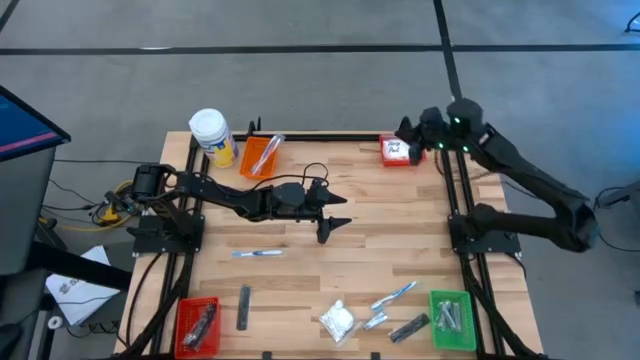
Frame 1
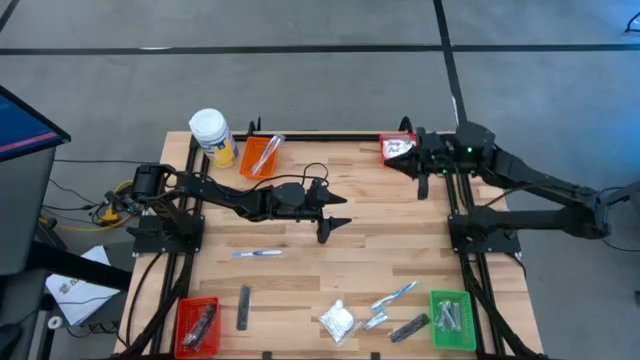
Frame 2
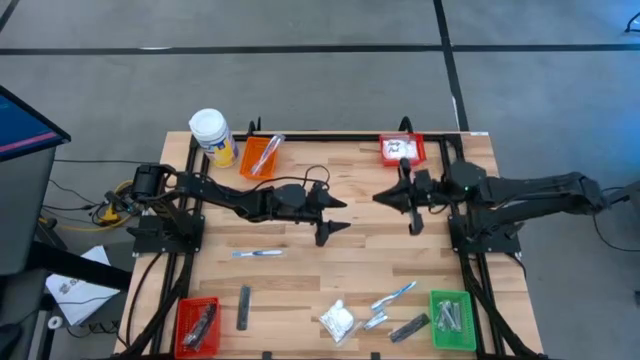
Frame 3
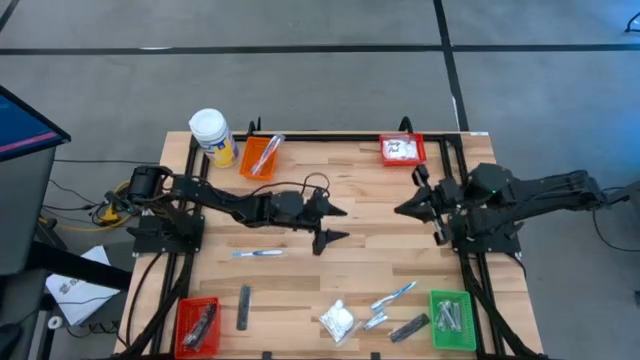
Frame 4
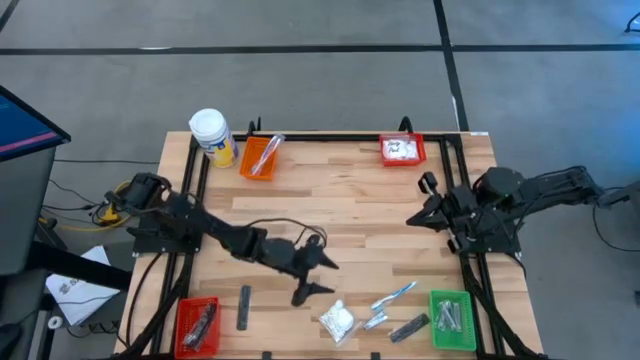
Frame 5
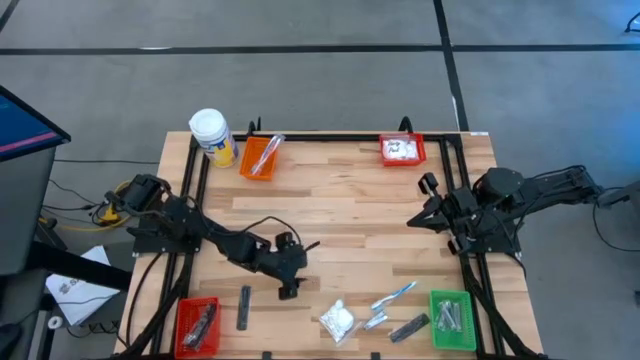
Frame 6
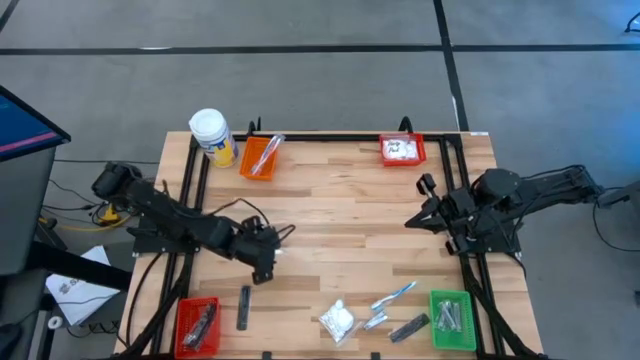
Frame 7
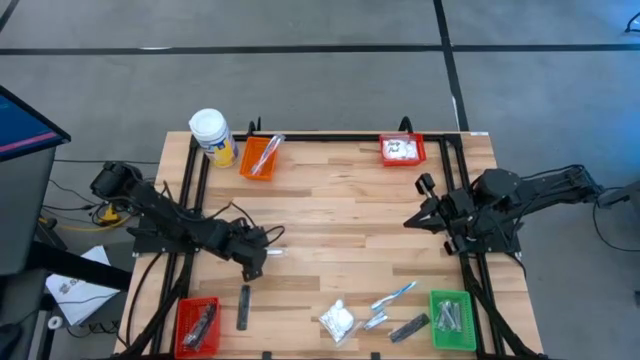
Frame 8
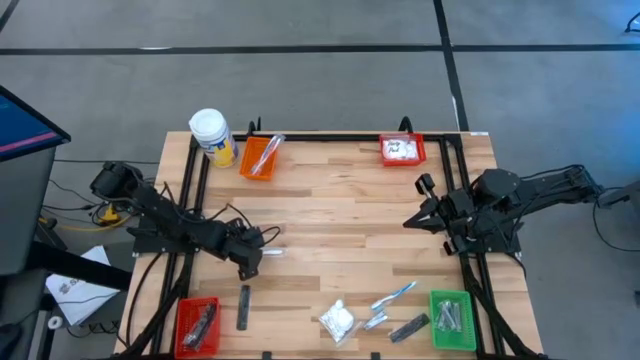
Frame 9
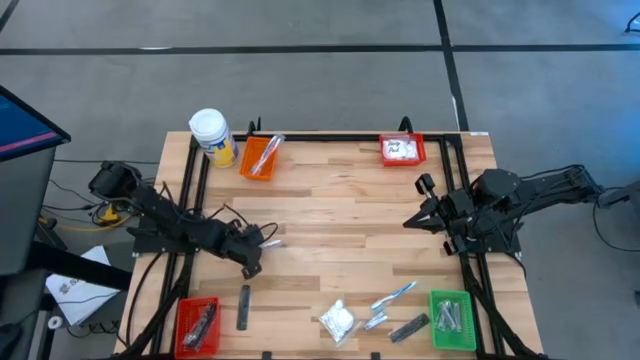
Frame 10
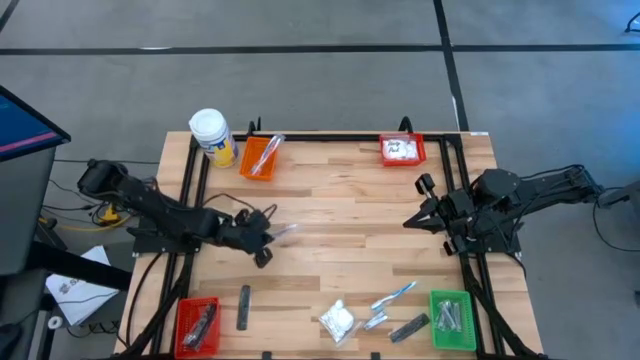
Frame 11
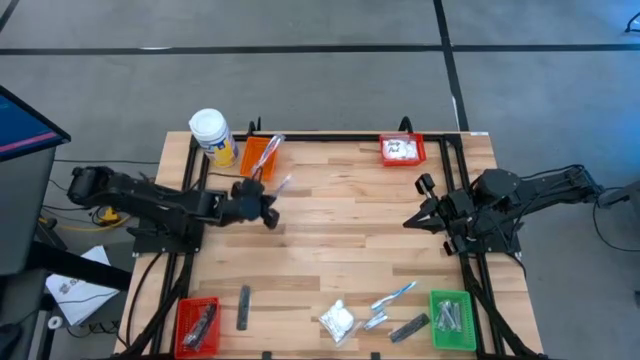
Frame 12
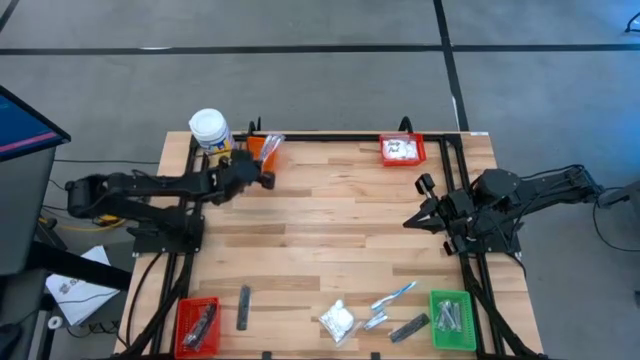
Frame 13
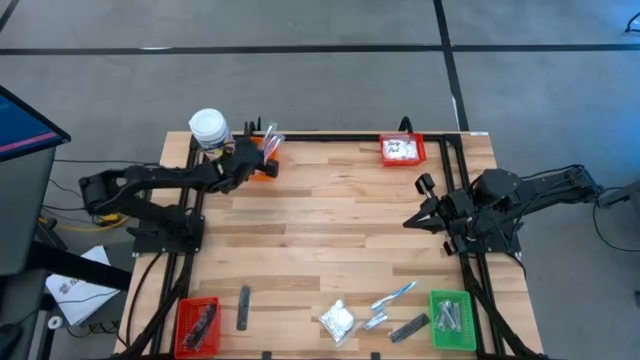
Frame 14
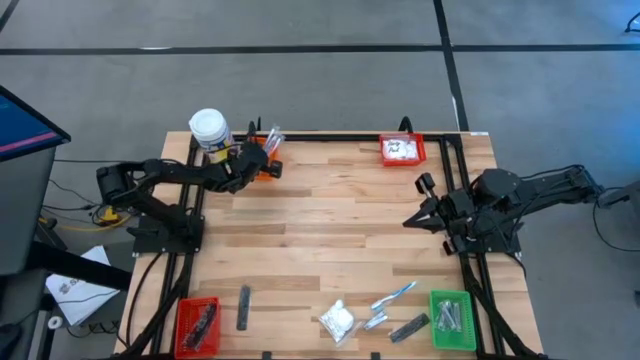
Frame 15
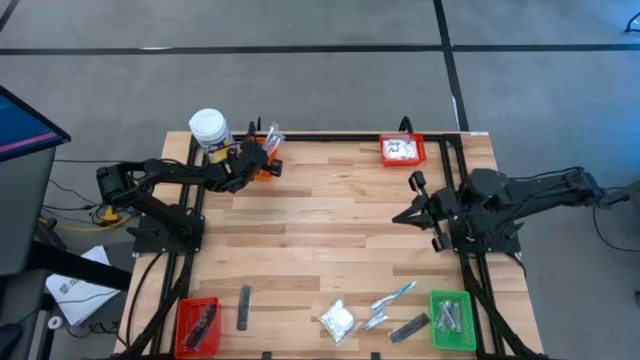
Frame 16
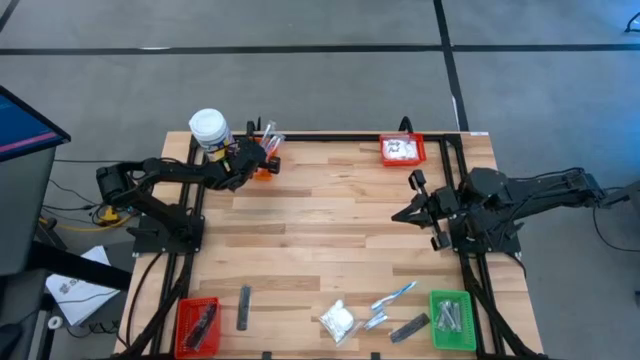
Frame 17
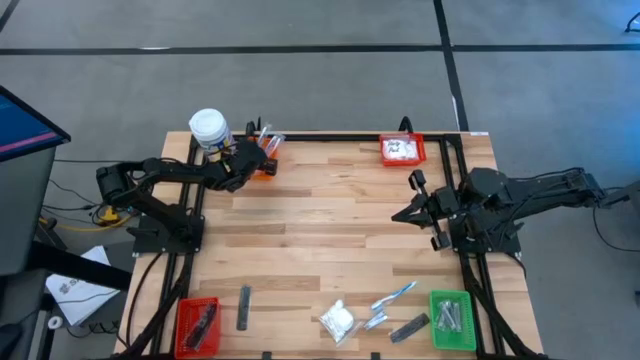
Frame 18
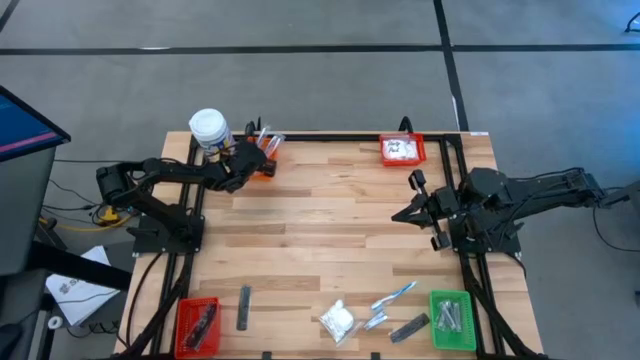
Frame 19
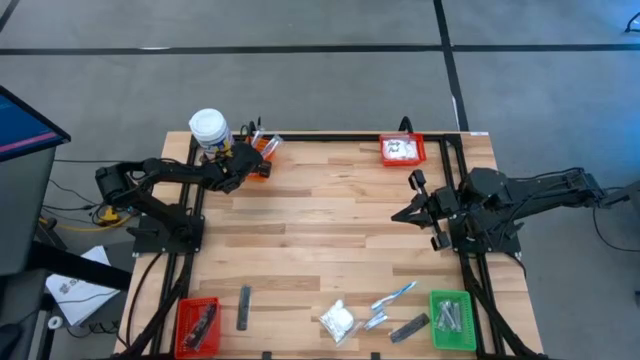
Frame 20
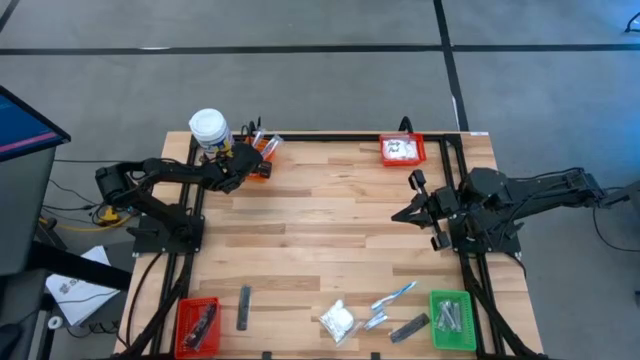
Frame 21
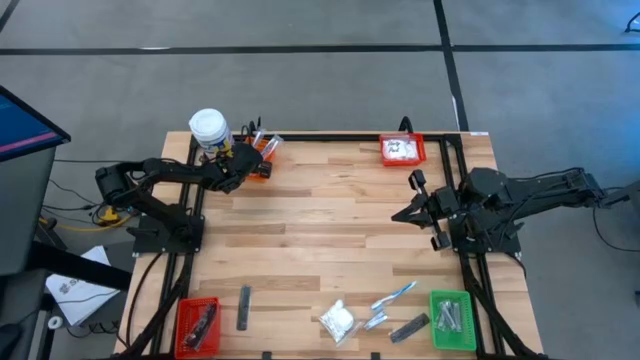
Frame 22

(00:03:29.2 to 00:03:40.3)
Task: Pick & Place Travel size toiletries
Put the left blue toothbrush into the orange bin

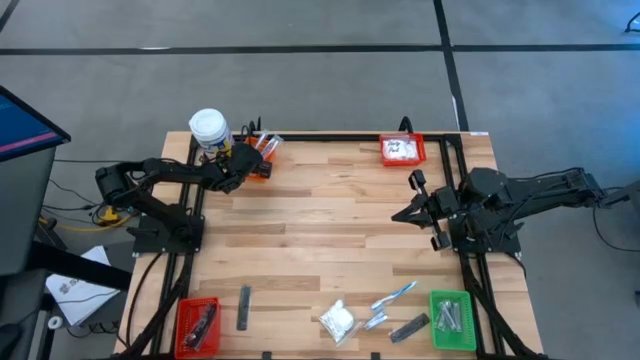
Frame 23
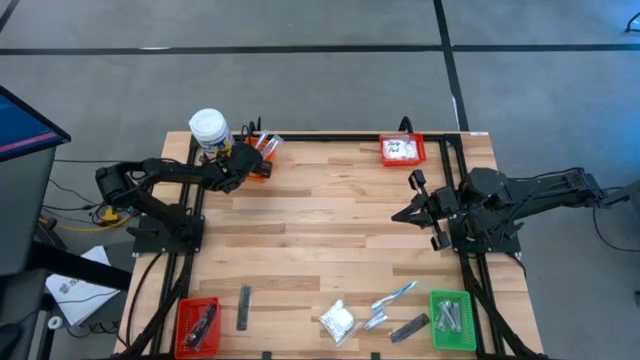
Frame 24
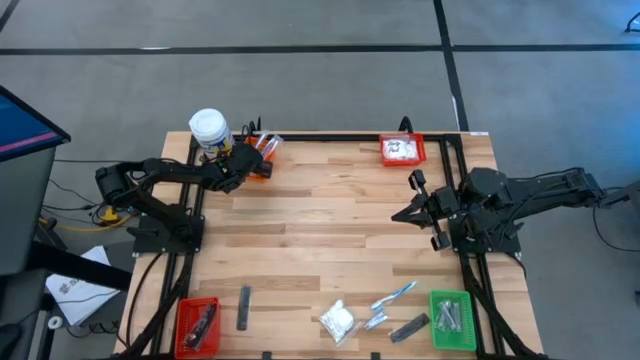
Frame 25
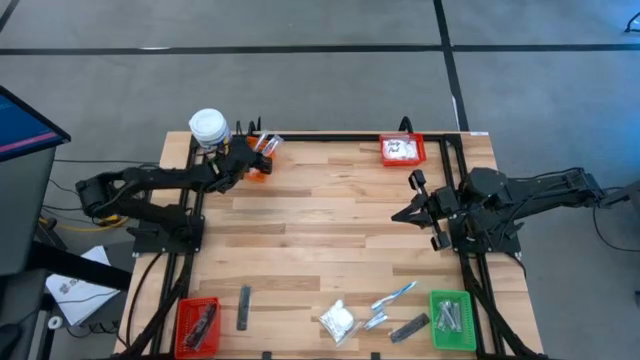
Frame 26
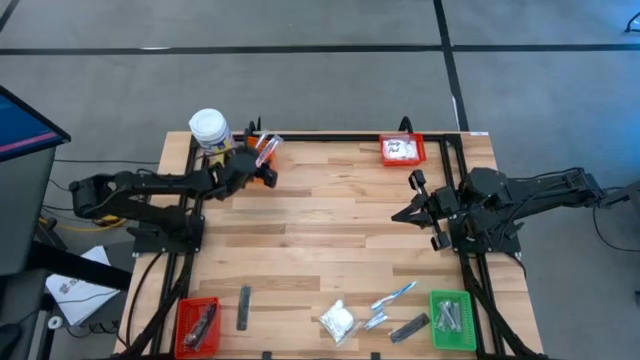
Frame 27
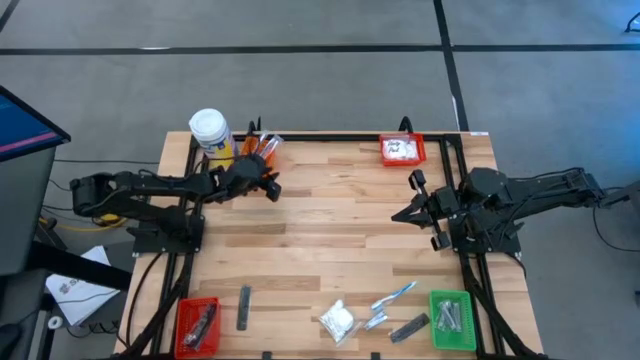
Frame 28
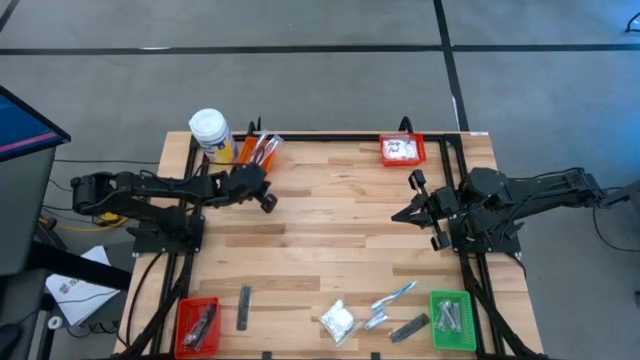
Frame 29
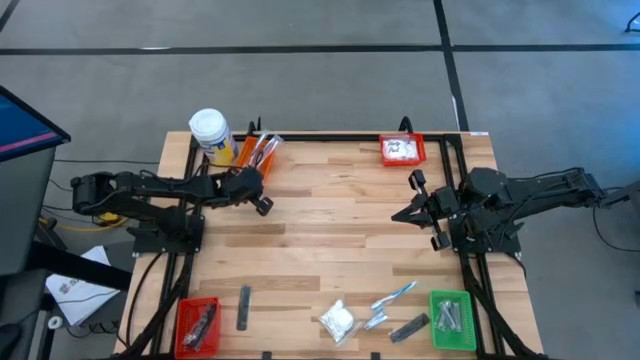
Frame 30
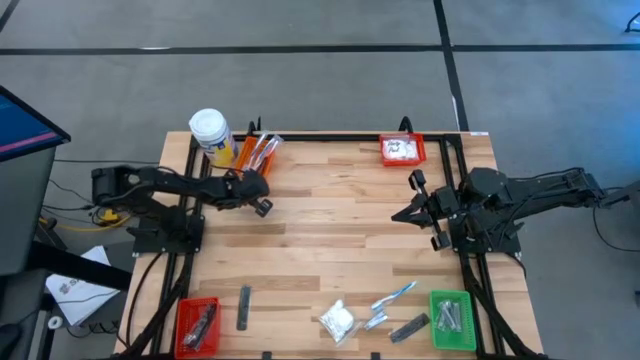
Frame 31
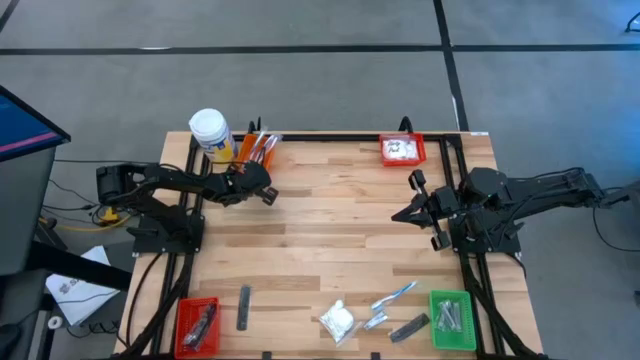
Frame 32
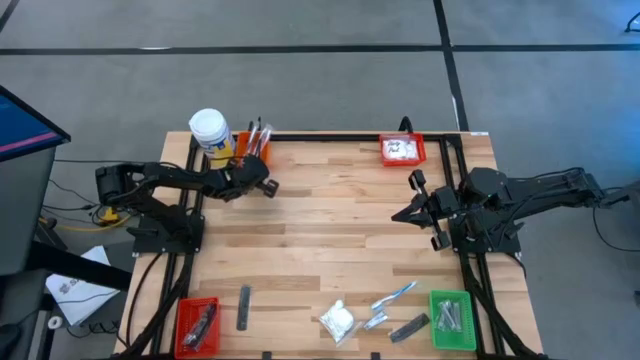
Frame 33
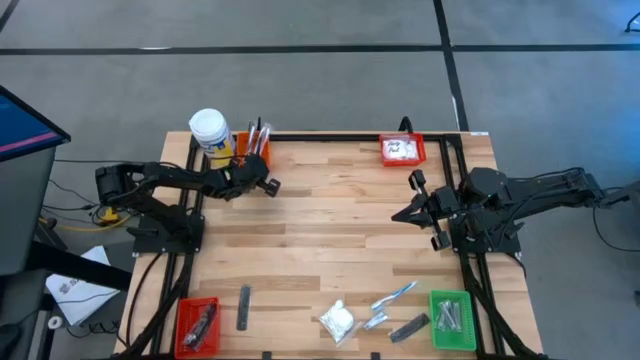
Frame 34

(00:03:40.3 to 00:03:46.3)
Adjust the orange bin on the table

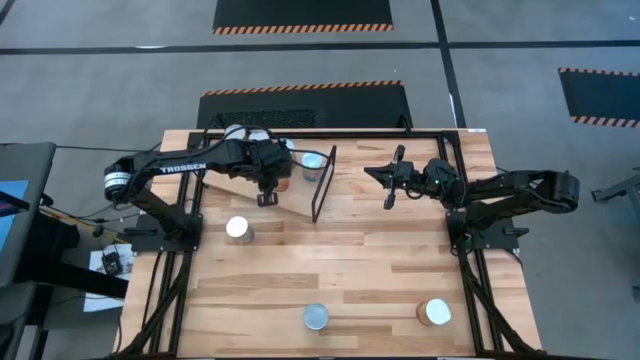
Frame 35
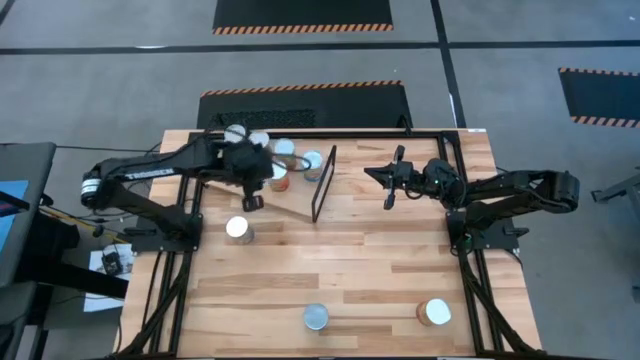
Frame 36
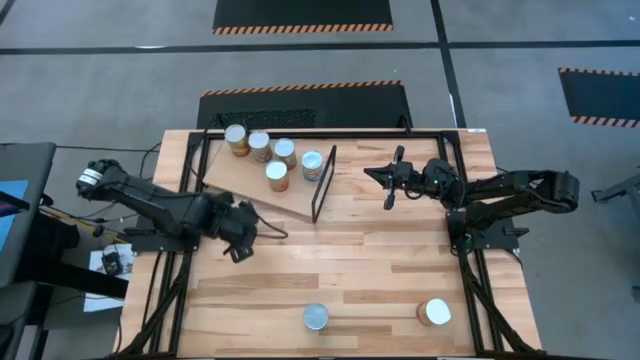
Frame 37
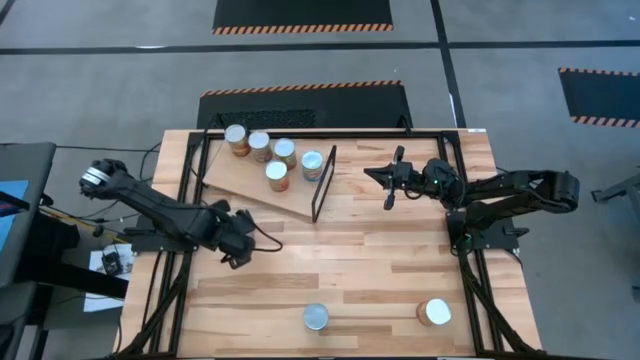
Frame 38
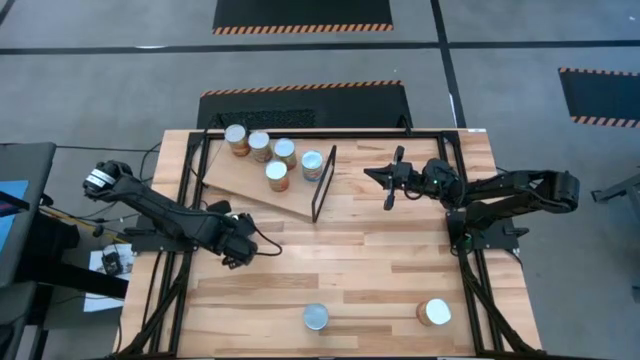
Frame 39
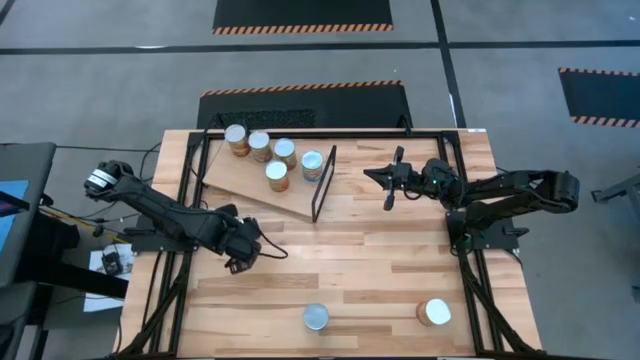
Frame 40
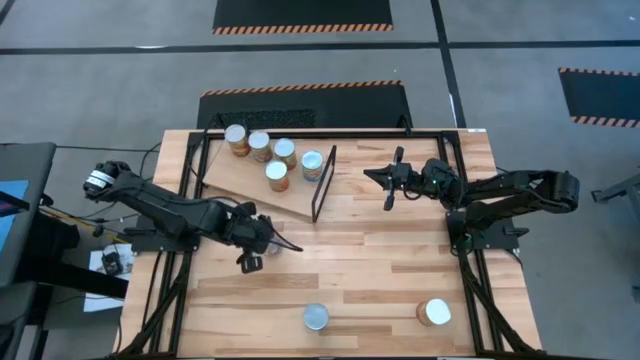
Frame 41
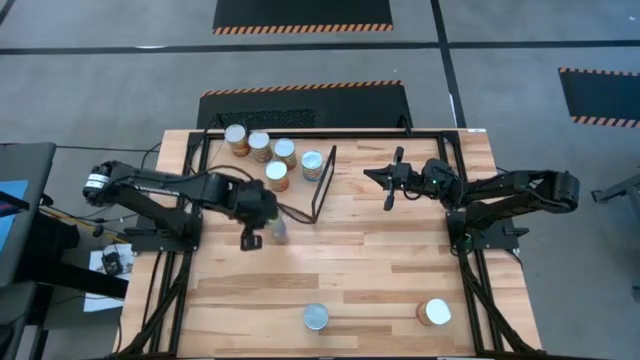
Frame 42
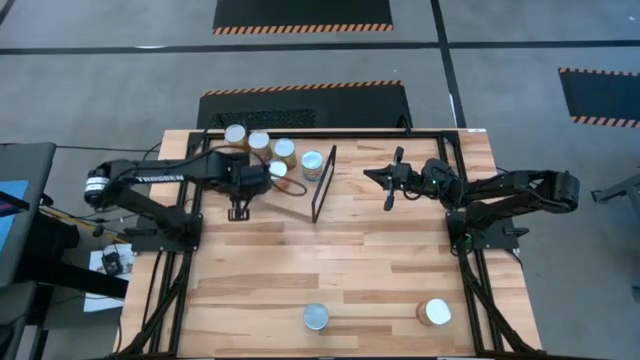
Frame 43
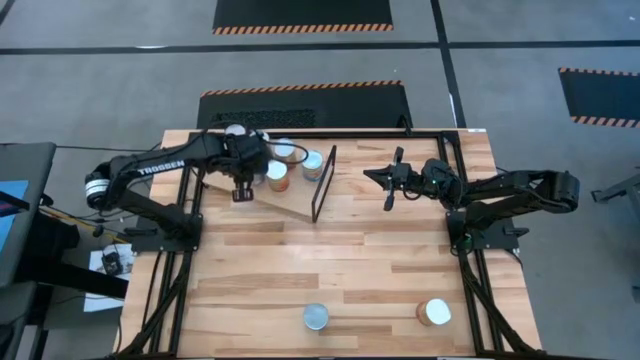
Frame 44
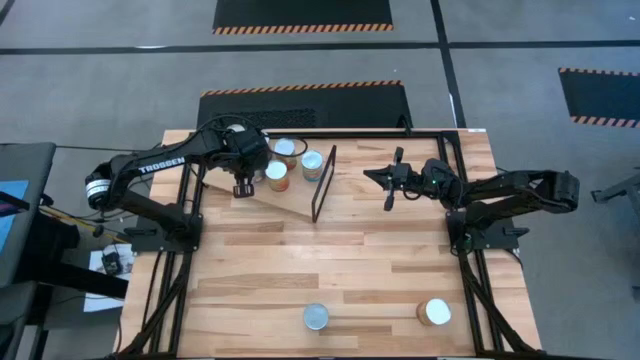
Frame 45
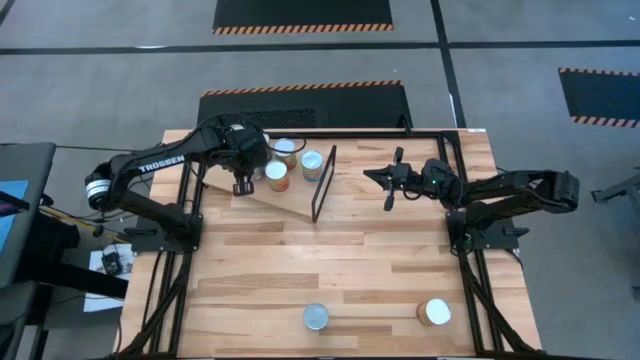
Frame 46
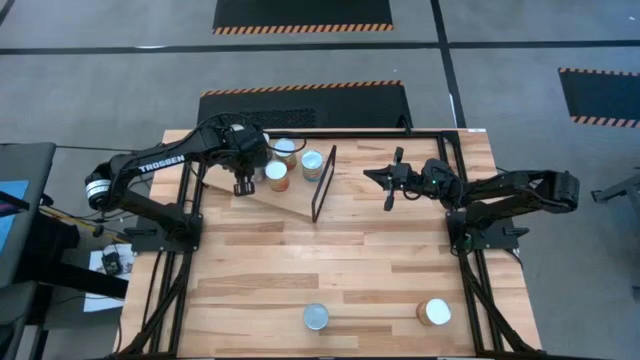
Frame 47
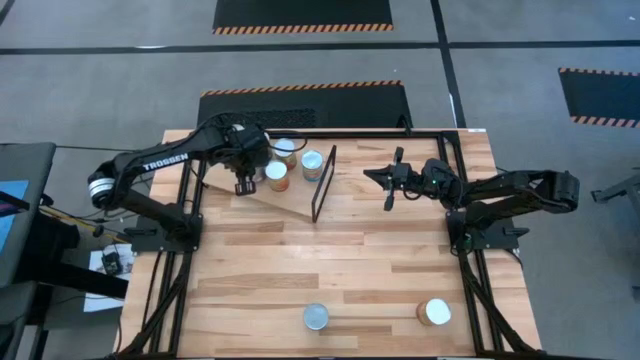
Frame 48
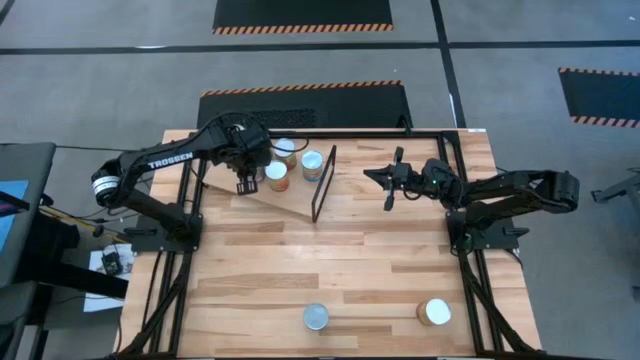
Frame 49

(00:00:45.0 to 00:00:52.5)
Task: Pick and place cans onto a shelf
Align the canned peaches with the other canned peaches on the shelf
